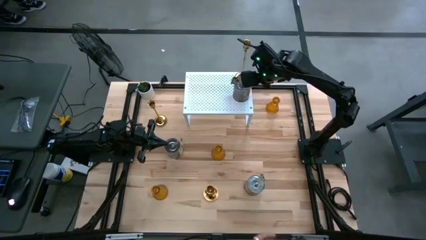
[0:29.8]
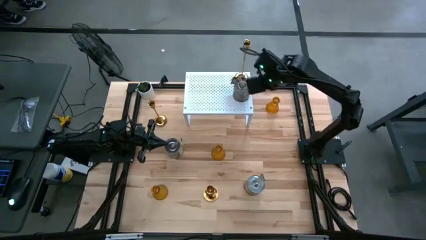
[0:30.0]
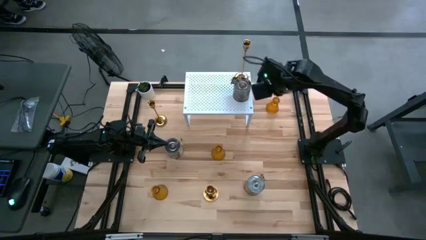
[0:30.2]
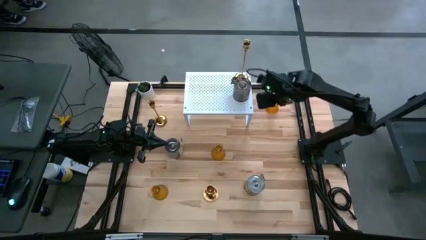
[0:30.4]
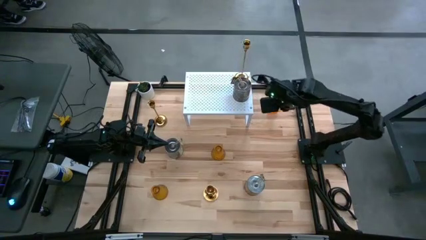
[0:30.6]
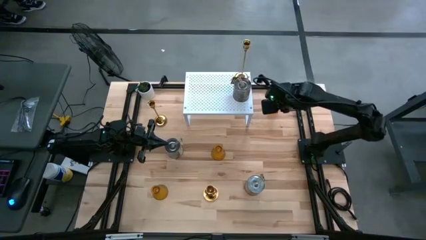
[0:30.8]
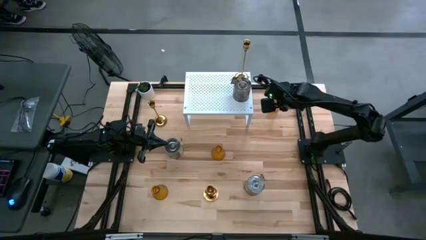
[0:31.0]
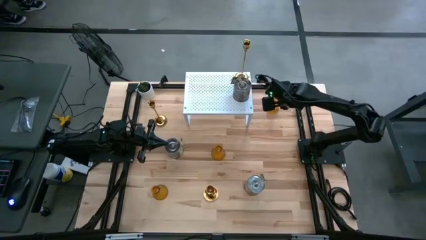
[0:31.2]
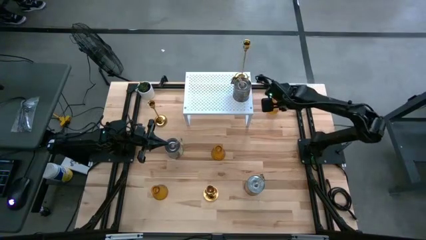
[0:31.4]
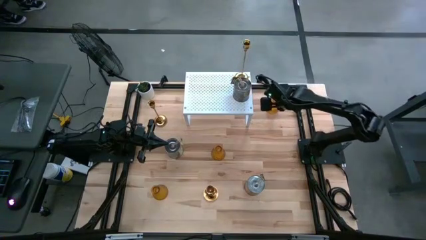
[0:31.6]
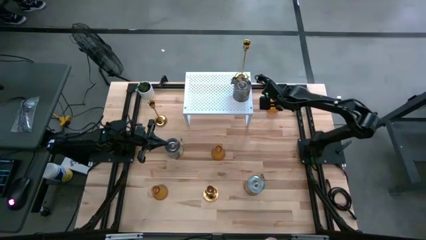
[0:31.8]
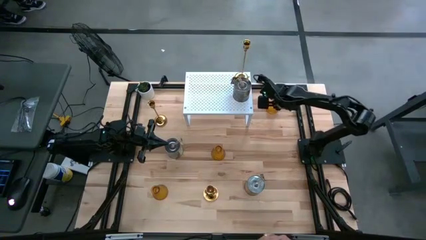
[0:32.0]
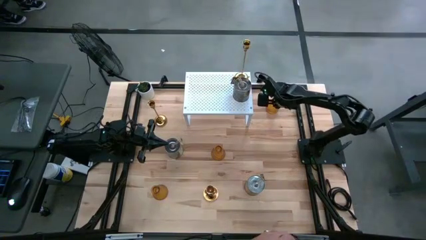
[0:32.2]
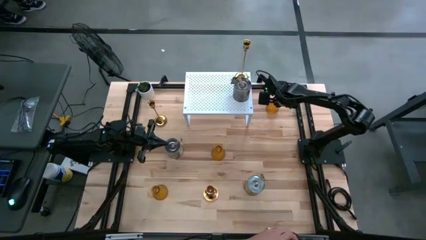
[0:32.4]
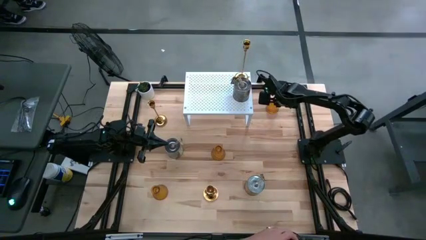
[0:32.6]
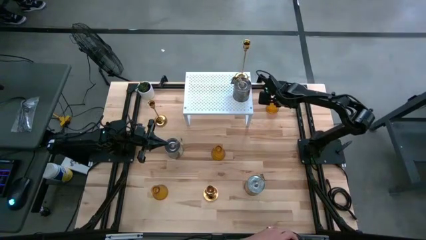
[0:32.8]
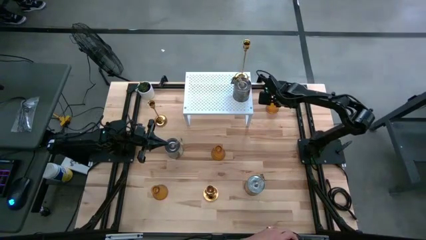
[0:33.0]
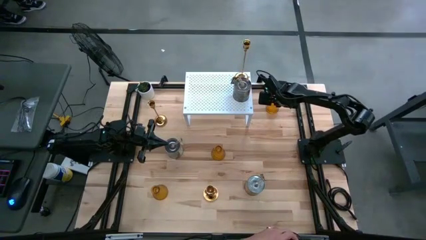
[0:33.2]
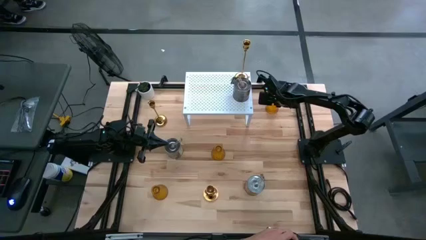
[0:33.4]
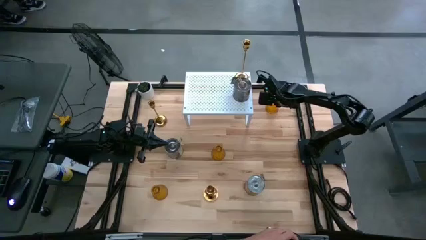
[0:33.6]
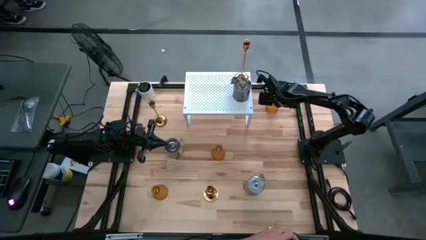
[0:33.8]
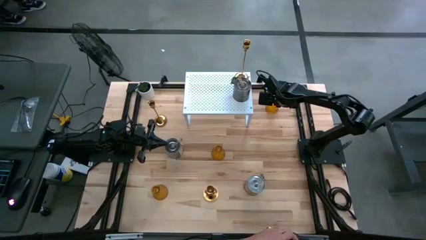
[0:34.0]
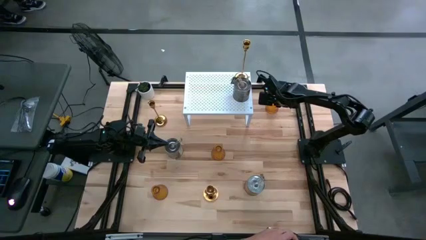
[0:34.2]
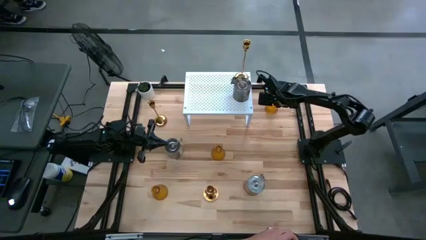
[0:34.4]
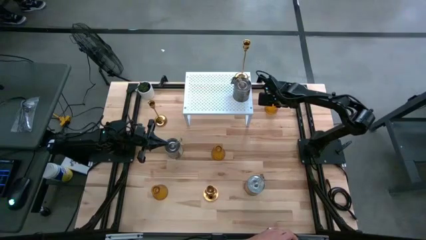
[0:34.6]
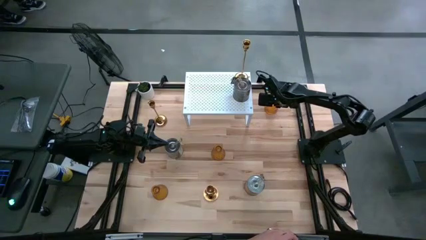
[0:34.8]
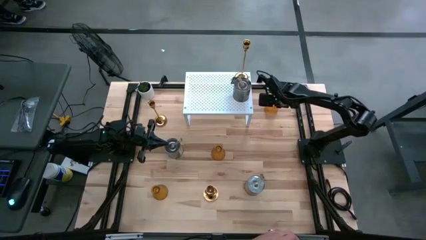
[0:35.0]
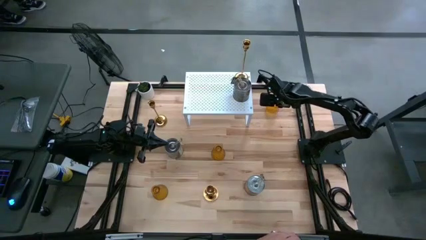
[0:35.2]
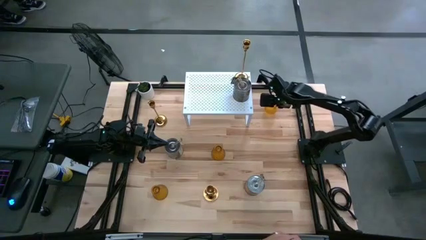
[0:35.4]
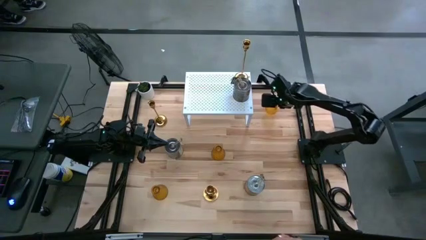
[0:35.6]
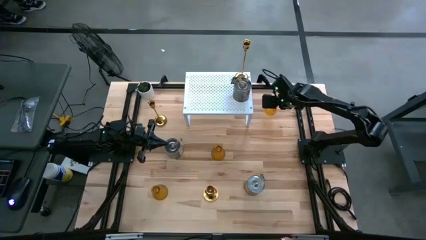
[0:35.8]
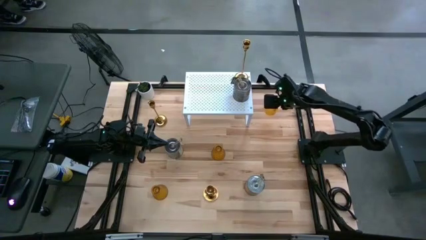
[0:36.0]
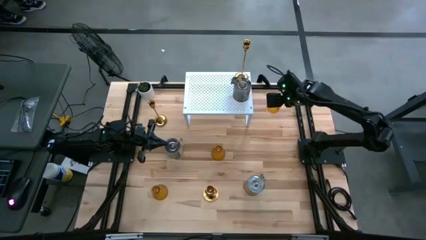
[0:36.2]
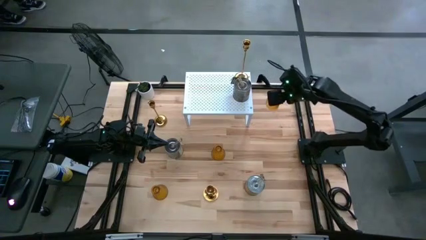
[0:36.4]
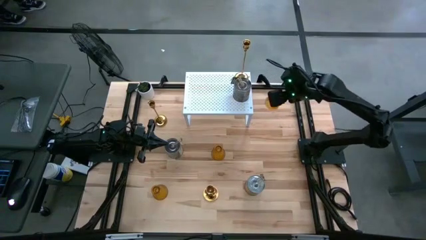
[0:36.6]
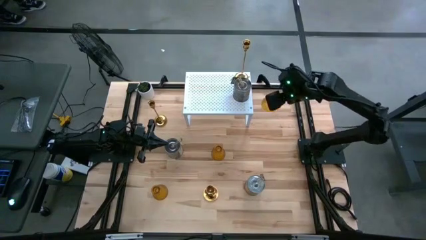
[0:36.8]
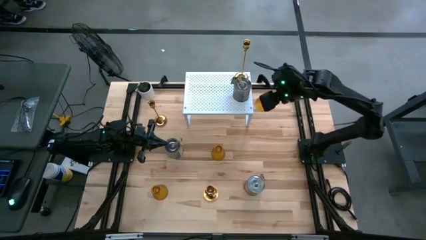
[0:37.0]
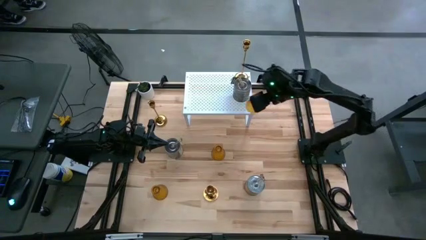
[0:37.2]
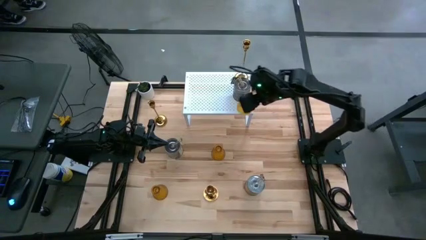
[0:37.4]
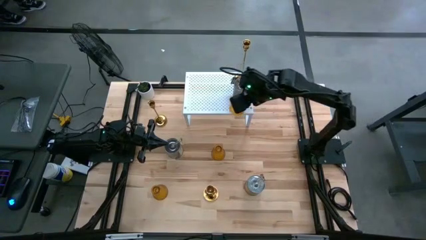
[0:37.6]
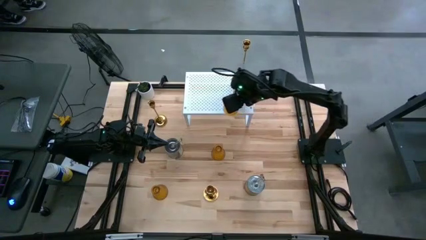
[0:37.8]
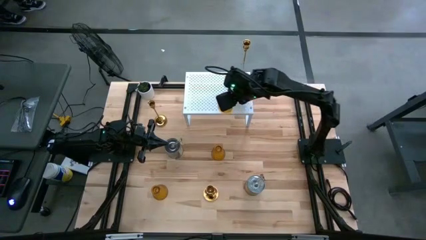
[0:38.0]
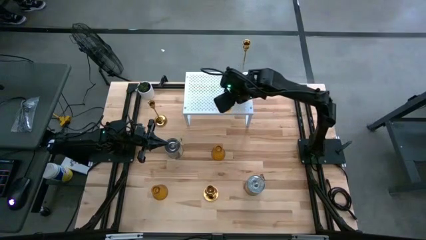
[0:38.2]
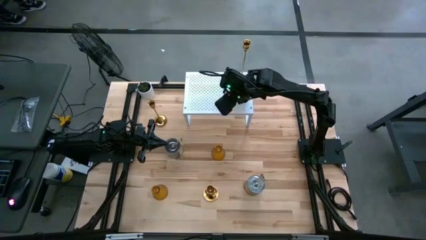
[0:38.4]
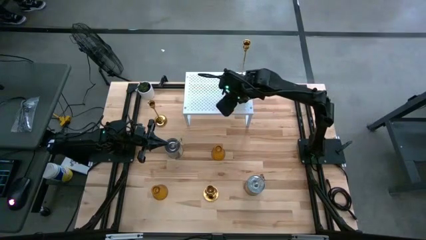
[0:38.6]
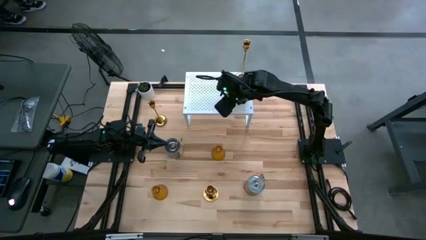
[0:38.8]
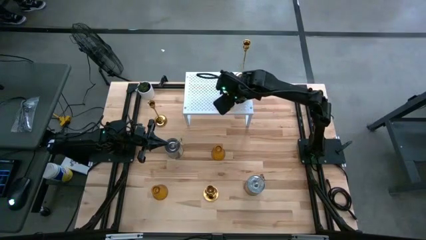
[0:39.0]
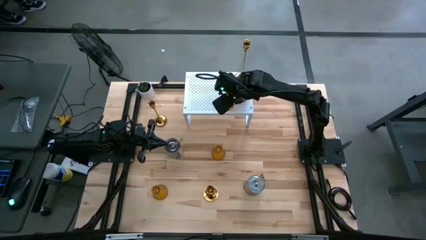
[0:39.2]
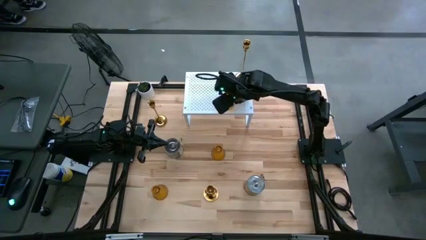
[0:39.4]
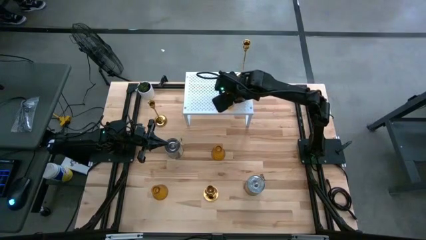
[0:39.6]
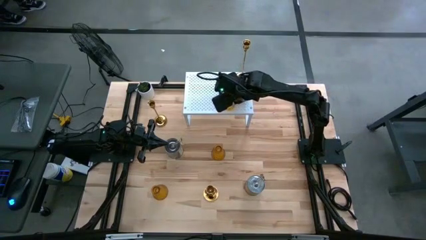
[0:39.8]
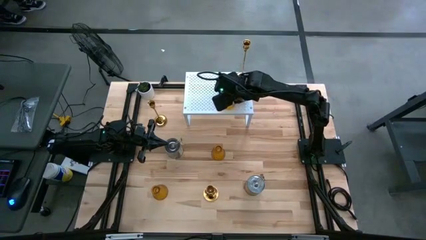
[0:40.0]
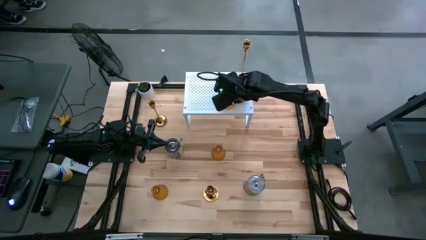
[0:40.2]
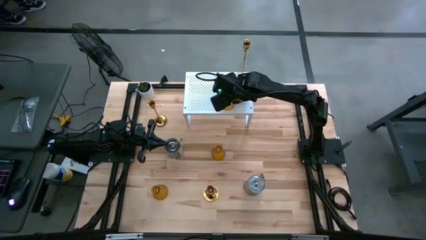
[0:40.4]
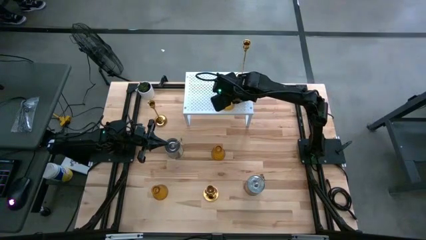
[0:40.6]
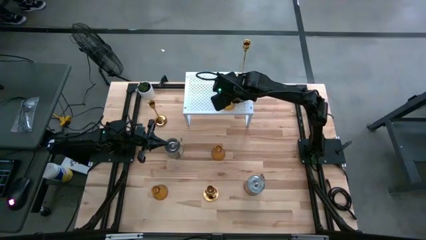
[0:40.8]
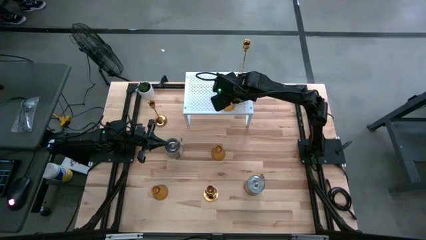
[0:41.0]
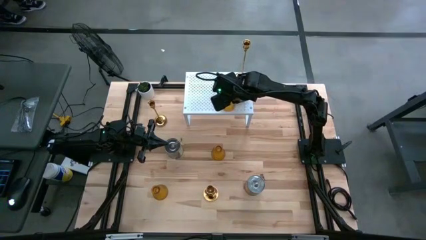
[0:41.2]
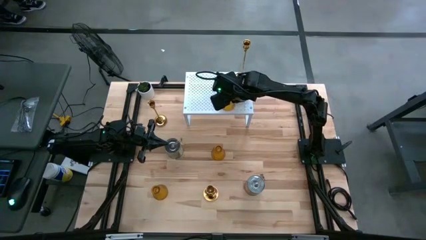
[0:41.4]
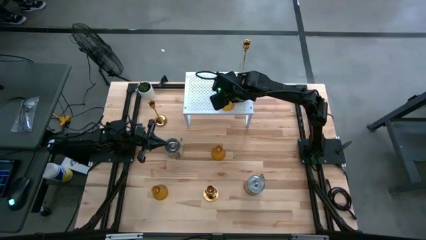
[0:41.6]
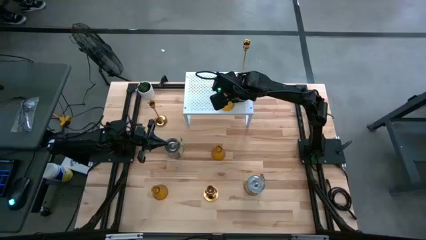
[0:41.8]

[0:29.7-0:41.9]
Task: Pick & Place candle stick holders
Put the top orange glass candle holder on the shelf

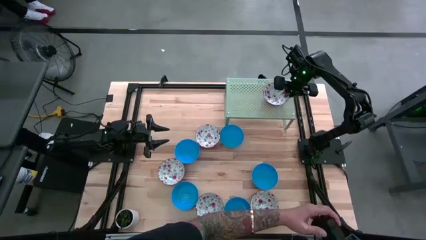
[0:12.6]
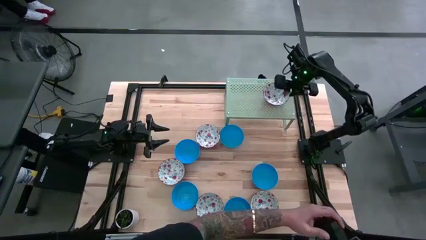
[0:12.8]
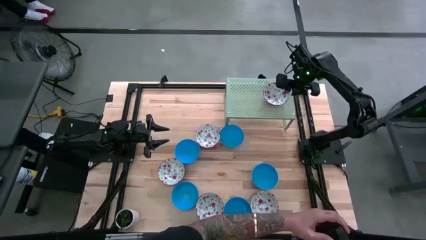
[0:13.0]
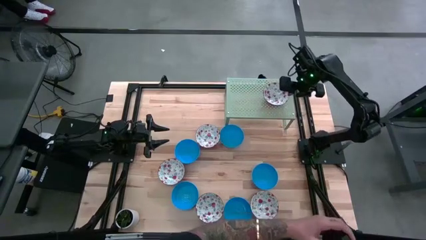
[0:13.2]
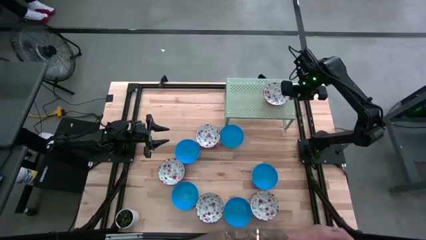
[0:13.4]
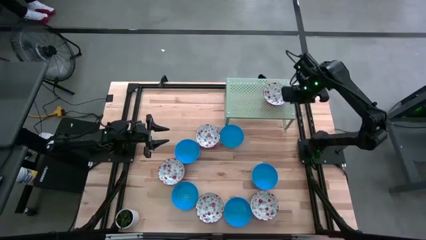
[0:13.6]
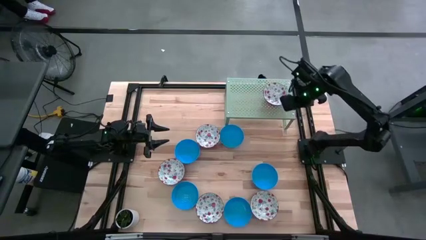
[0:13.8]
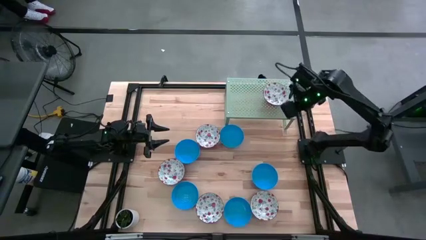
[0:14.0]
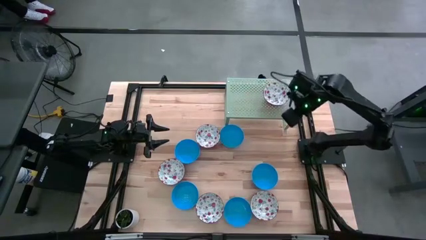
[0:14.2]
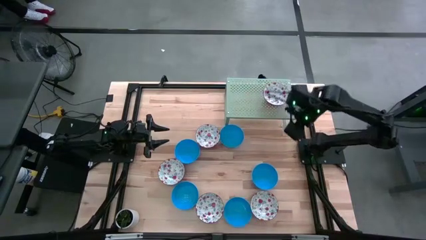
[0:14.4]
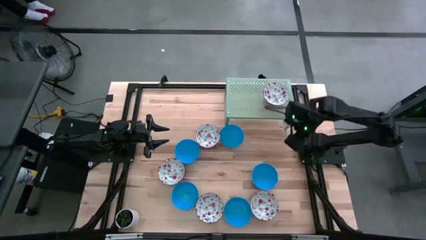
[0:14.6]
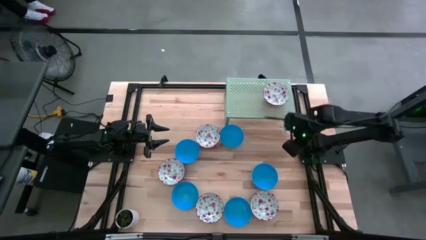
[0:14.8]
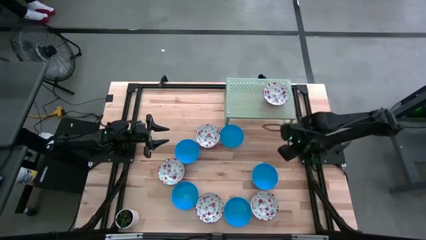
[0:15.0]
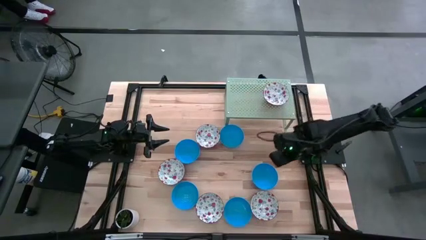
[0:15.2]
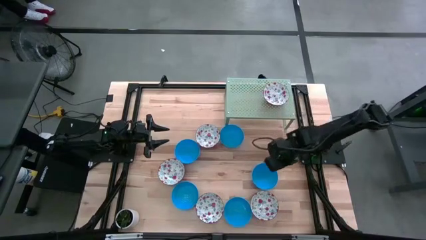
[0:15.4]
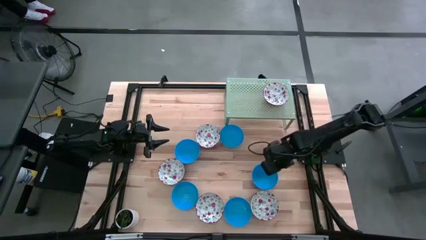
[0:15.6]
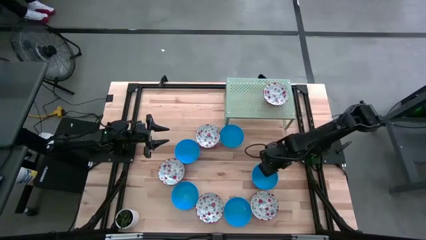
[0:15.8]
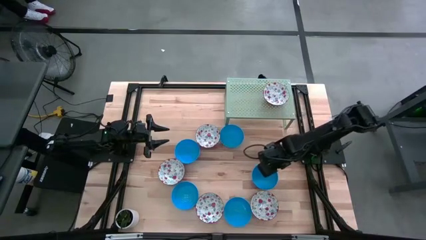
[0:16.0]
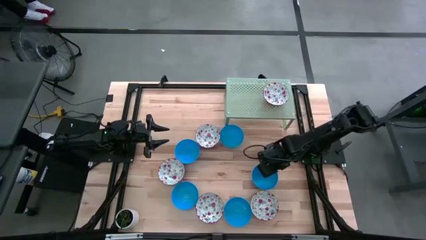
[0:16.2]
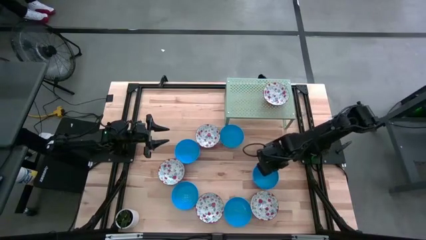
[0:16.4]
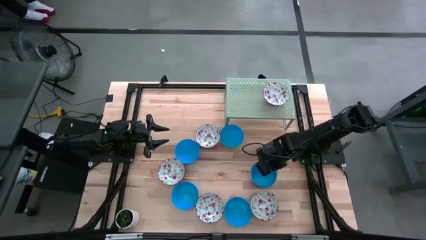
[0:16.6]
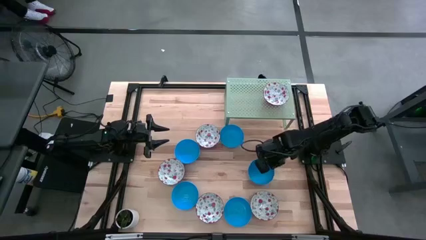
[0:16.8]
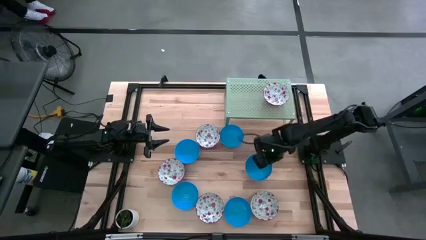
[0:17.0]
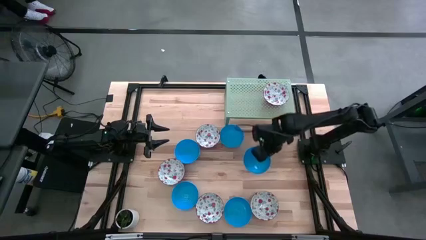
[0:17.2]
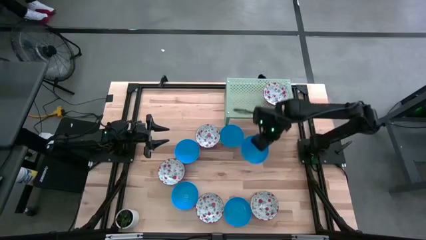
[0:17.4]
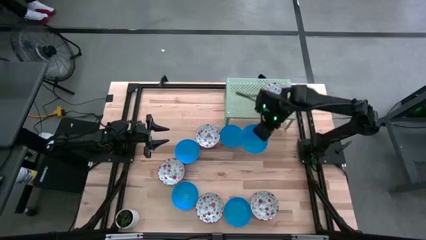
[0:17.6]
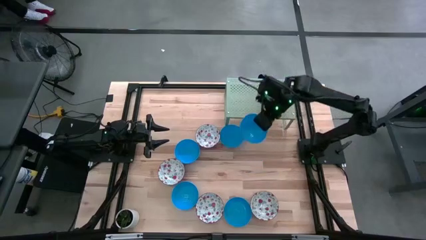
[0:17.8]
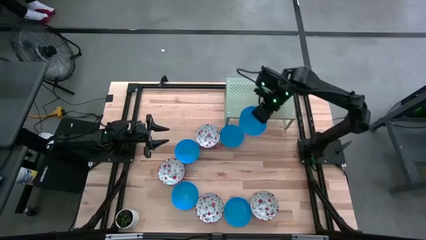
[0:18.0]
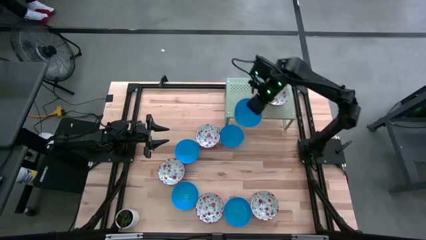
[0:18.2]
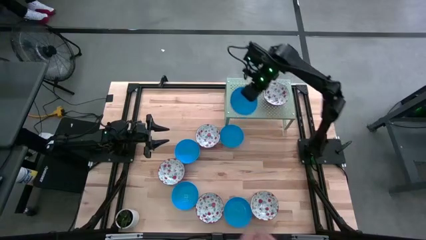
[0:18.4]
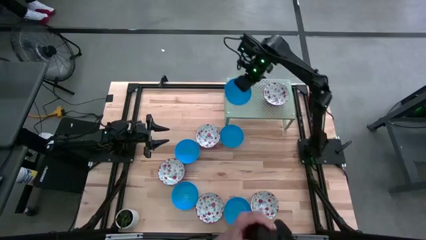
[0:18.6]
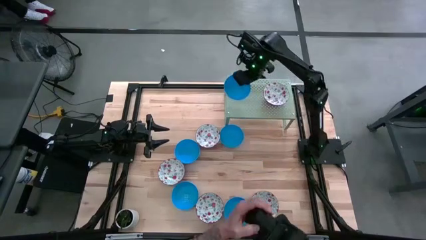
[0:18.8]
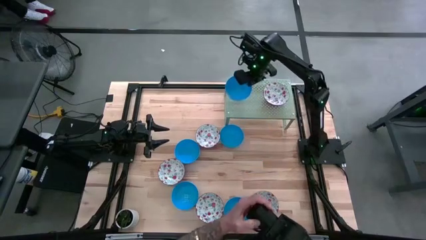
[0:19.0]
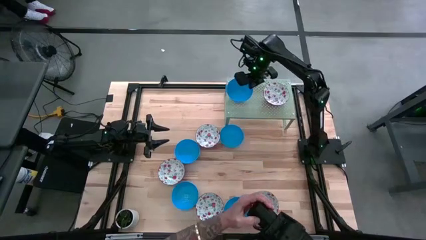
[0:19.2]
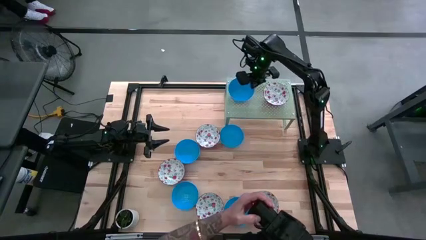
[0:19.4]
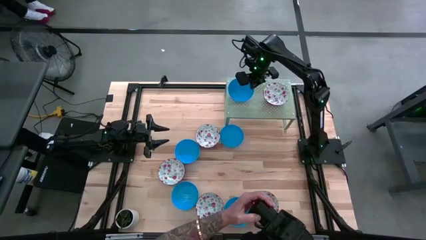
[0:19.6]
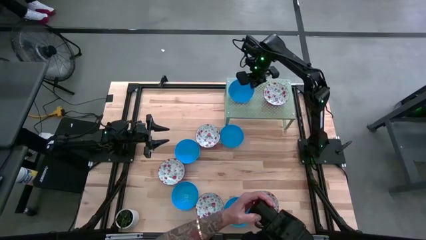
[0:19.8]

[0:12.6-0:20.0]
Task: Pick & Place Mini bowls
Put the blue bowl on the green shelf
